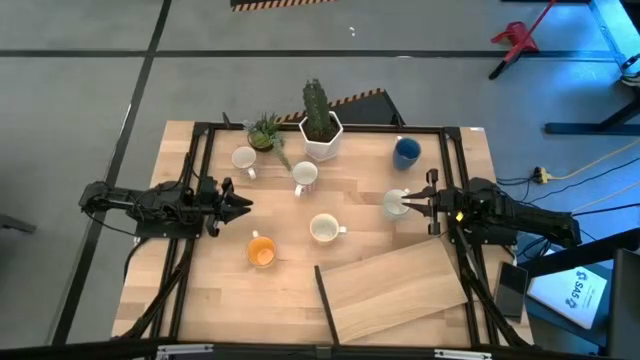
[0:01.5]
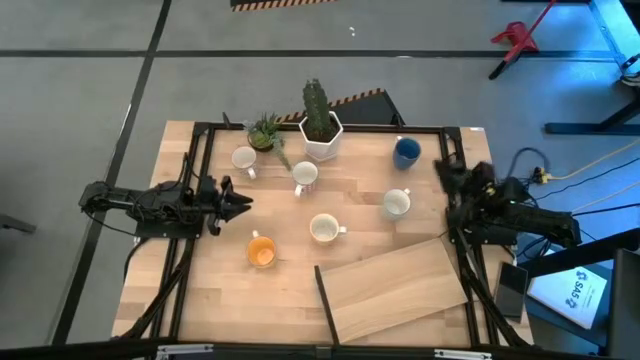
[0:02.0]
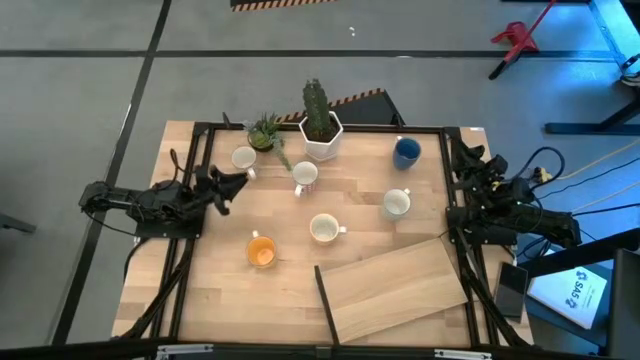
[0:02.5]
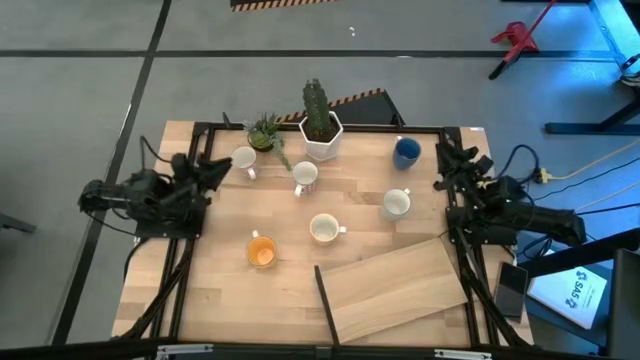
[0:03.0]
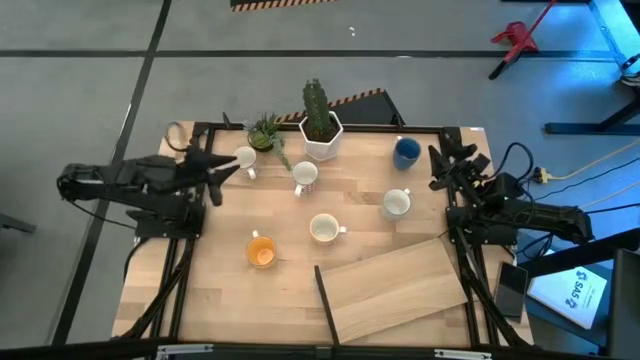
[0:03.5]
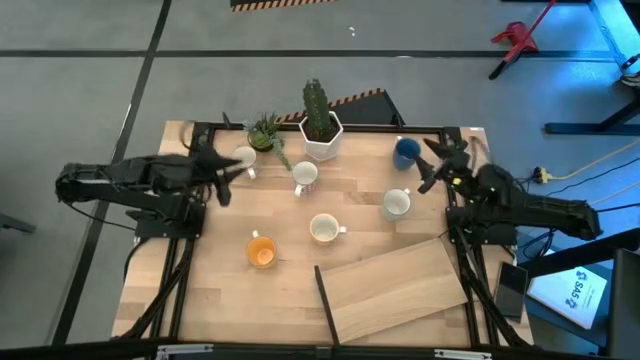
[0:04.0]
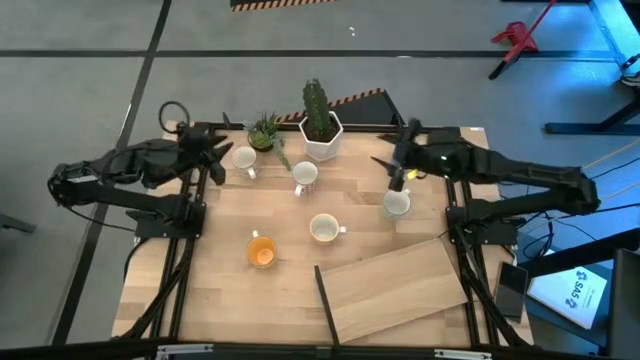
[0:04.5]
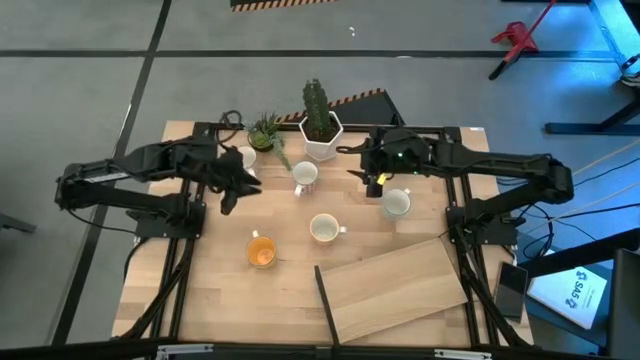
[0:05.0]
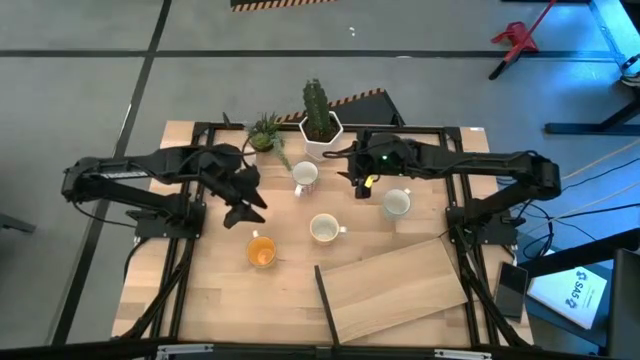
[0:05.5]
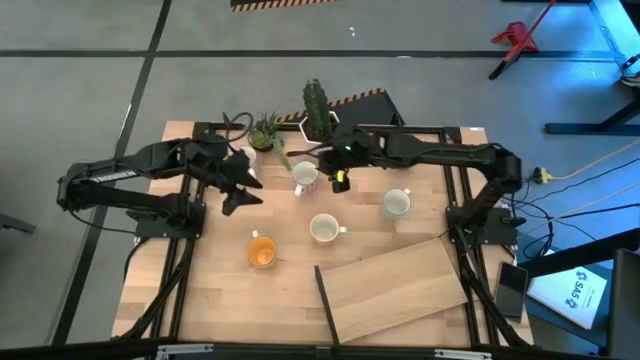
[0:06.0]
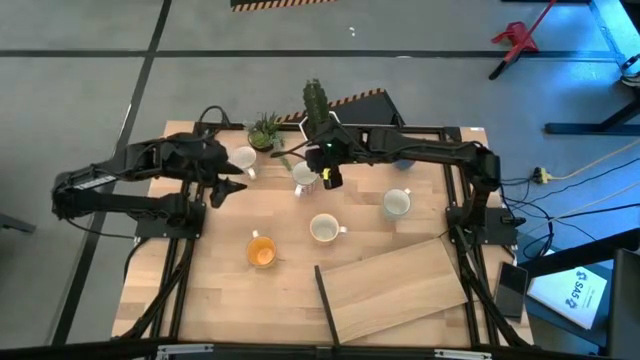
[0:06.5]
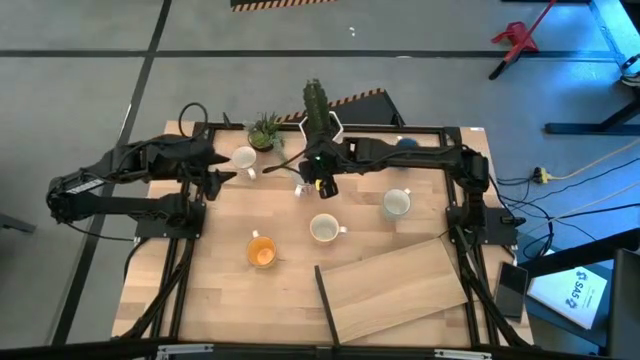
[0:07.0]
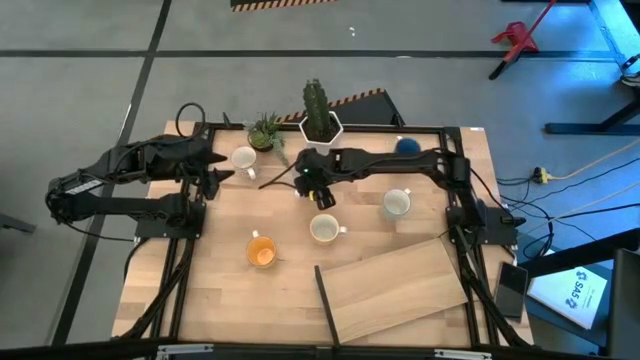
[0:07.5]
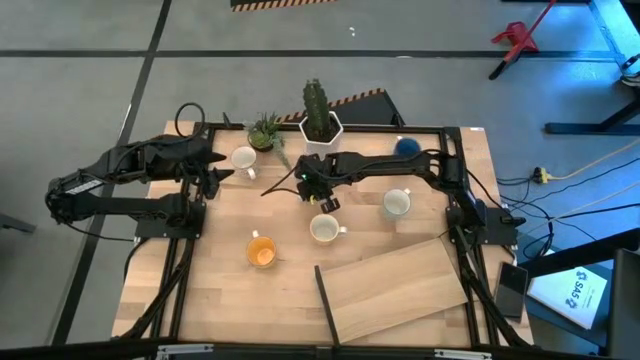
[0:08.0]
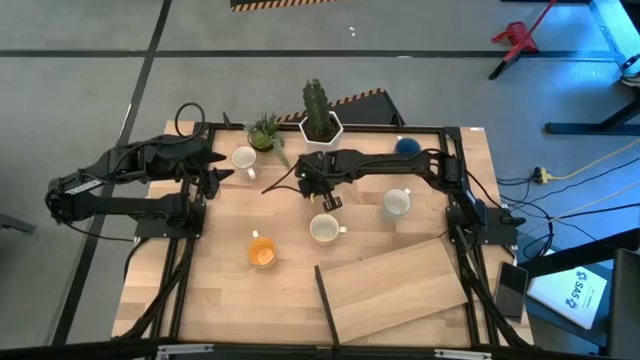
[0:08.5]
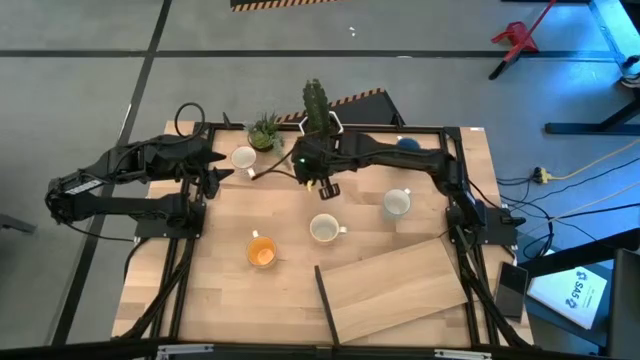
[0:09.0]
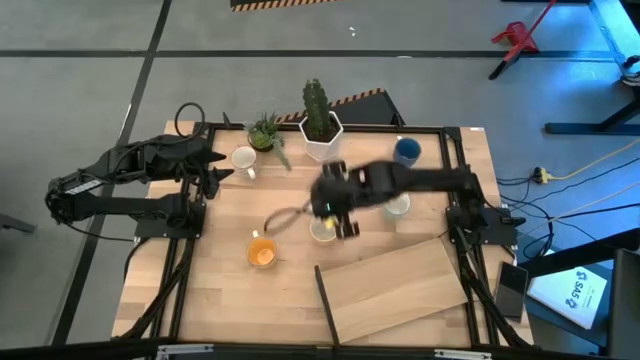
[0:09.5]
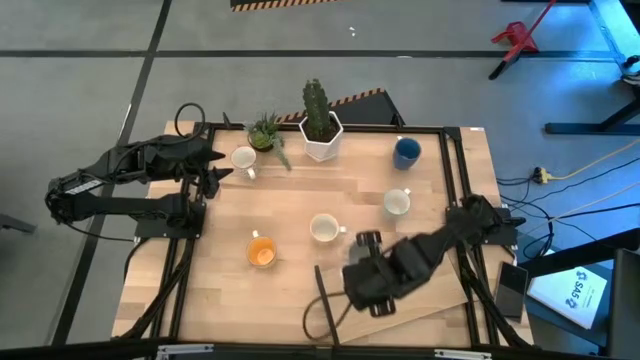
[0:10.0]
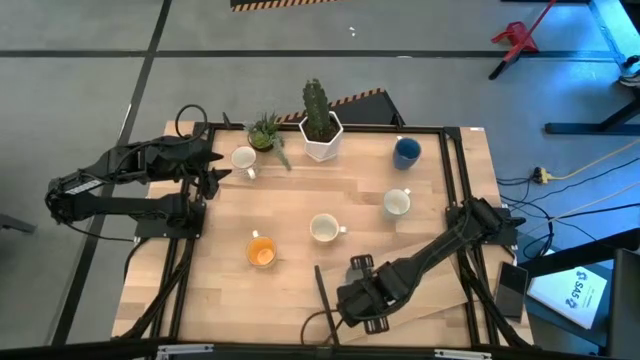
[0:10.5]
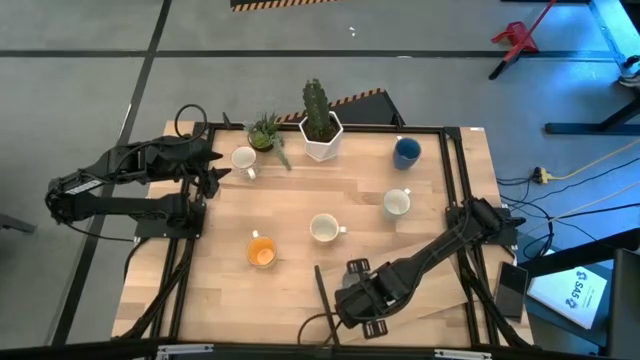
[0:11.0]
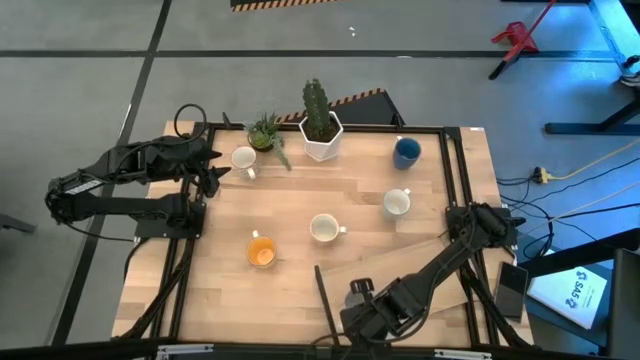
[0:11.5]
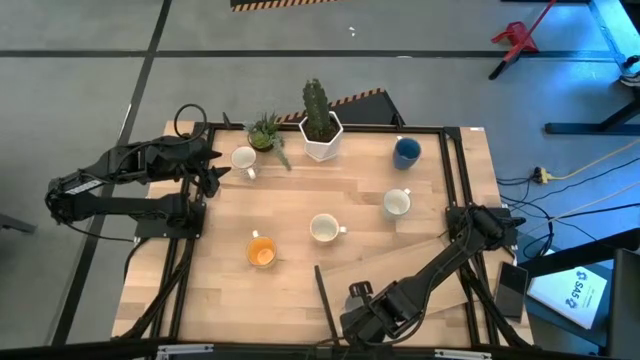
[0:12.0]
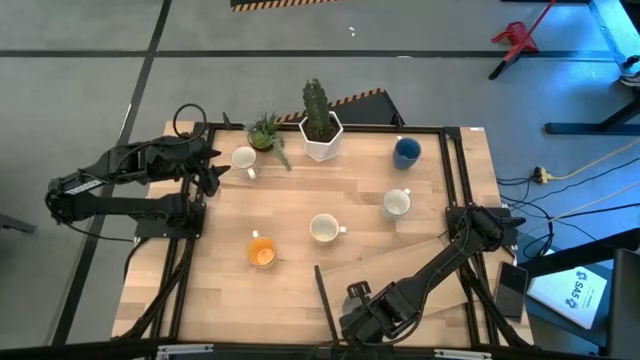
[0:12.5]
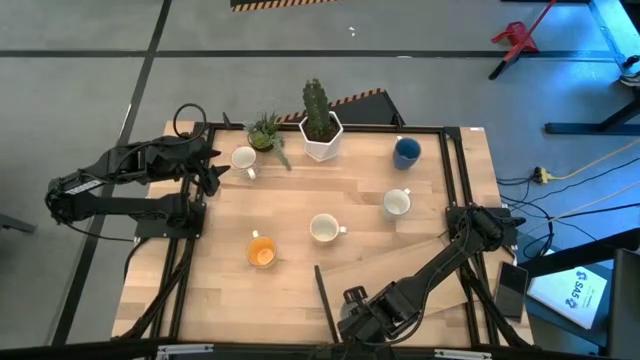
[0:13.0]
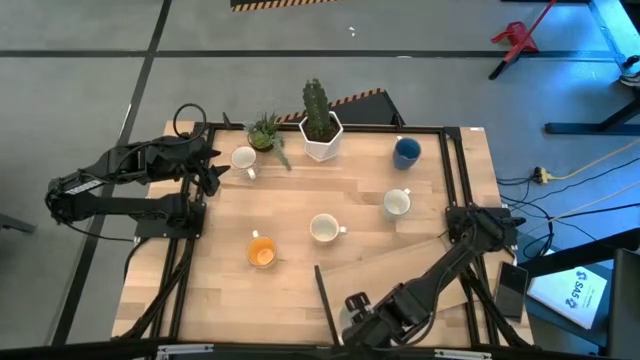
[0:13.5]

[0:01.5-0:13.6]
Task: Place coffee mugs
Put the red mug on the shelf

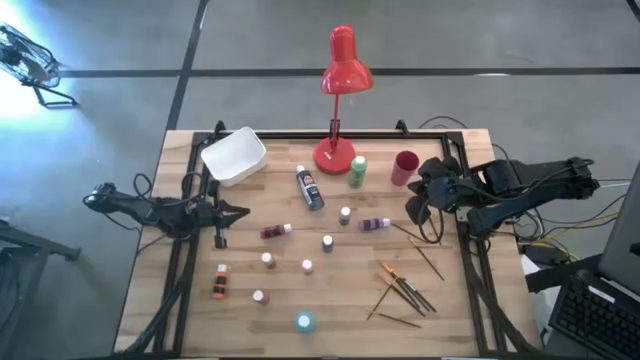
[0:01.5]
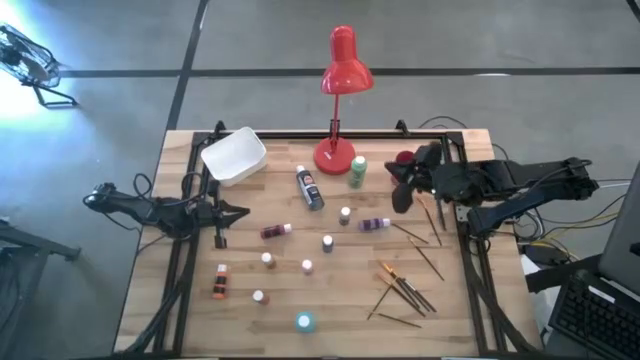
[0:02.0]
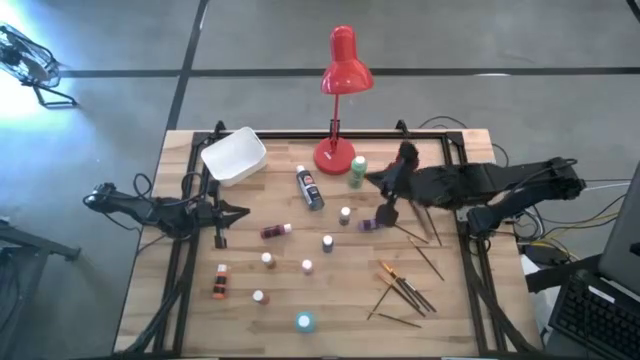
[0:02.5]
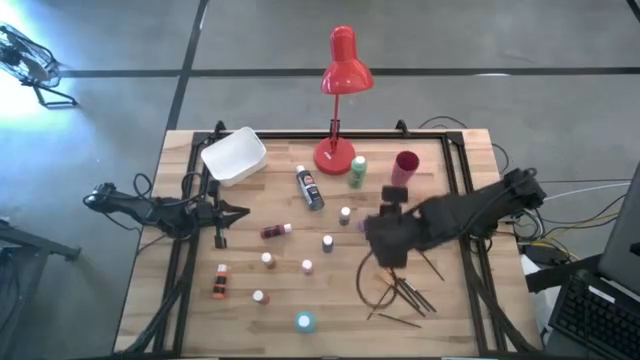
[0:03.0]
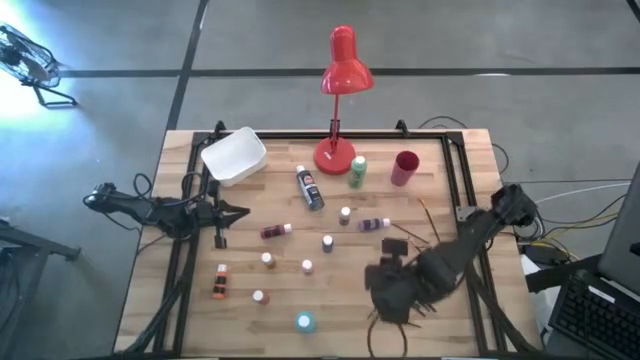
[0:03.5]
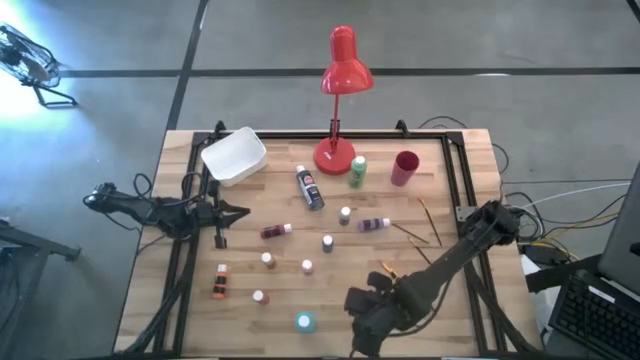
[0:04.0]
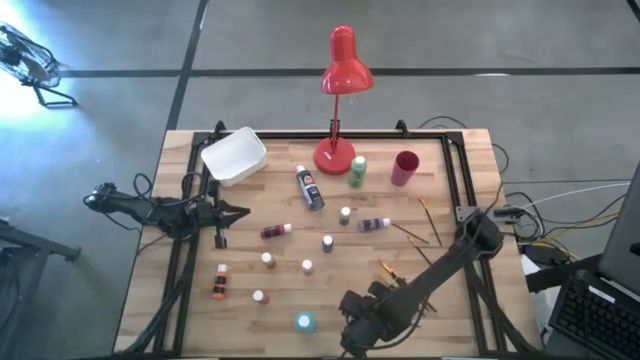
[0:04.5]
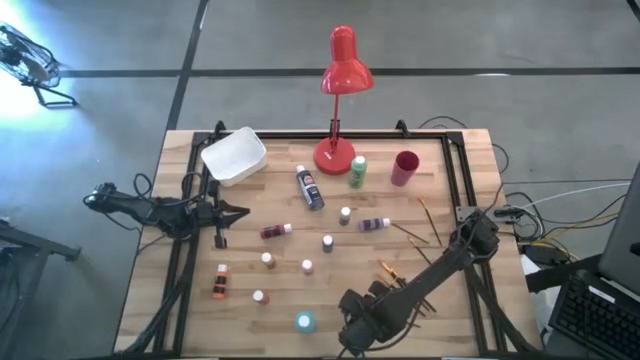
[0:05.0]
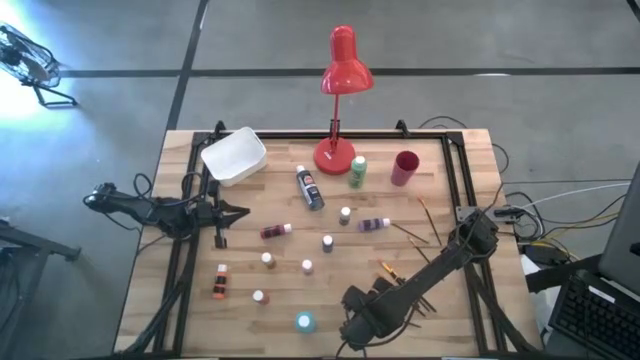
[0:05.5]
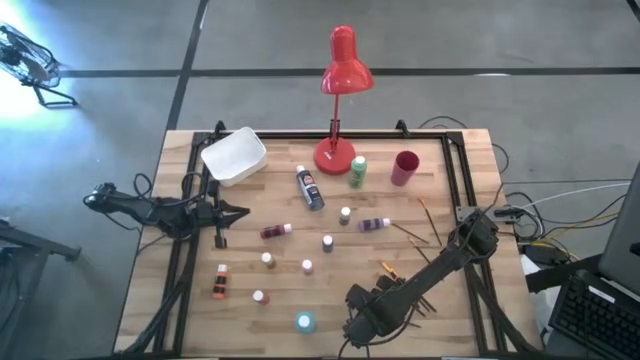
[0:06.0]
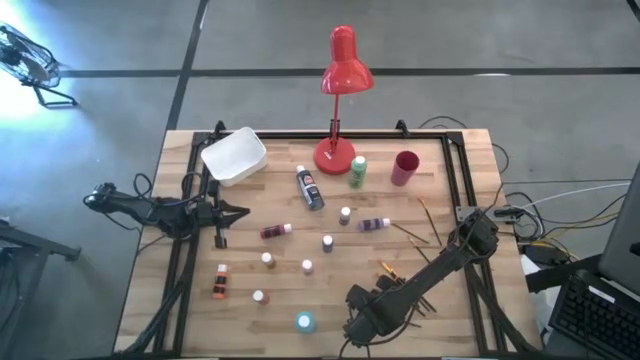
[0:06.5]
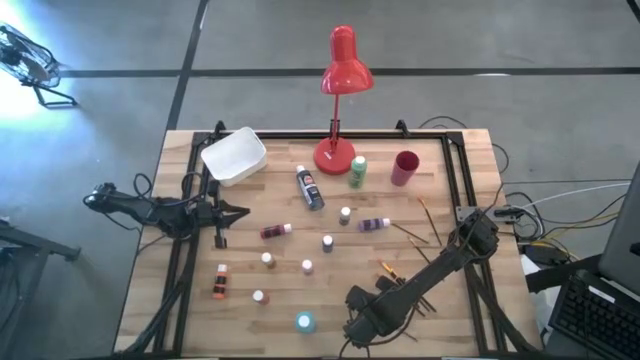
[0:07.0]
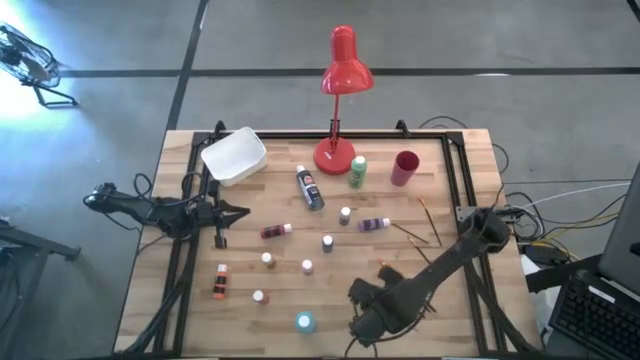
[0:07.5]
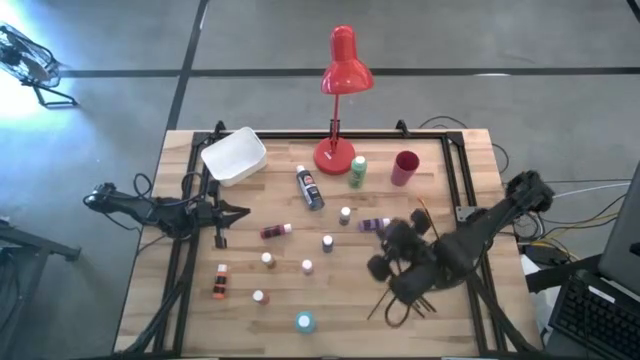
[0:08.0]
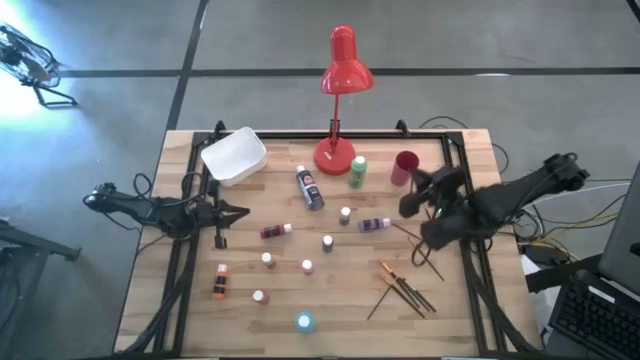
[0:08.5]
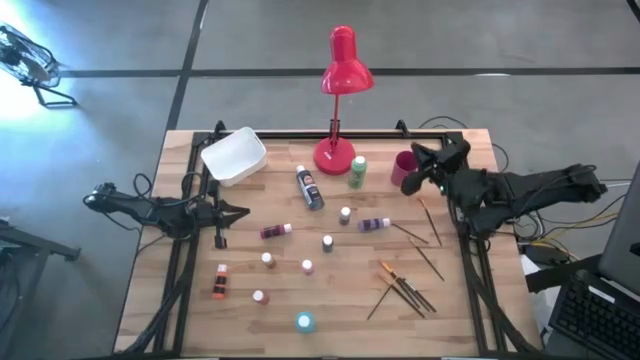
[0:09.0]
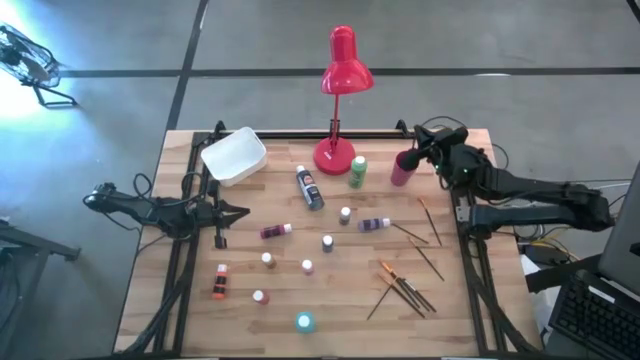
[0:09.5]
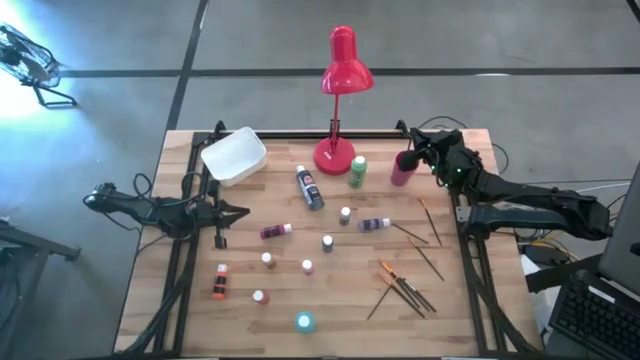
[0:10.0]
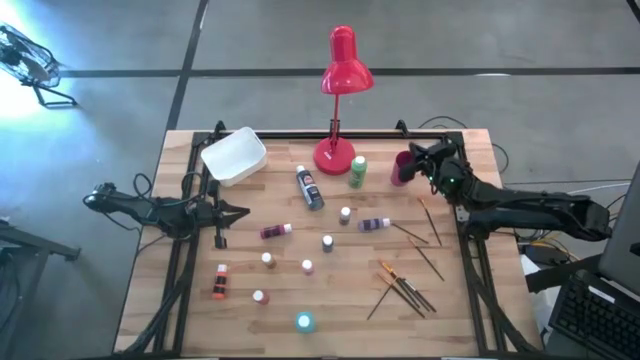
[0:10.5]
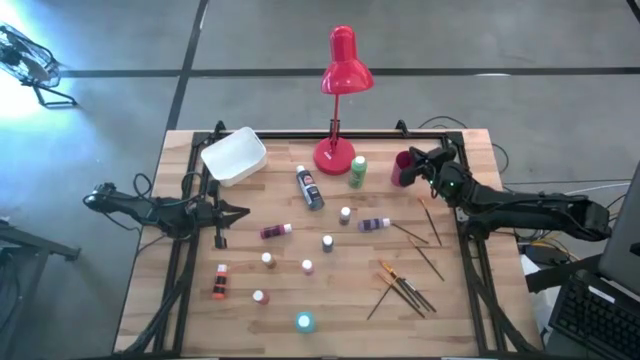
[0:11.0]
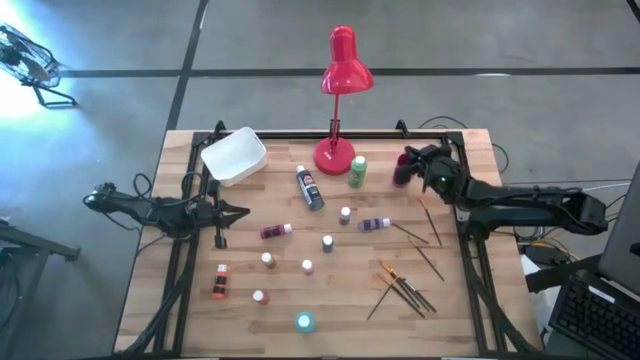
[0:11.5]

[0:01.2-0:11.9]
Task: Pick & Place Paint Supplies
Put the gold paintbrush into the pink cup
